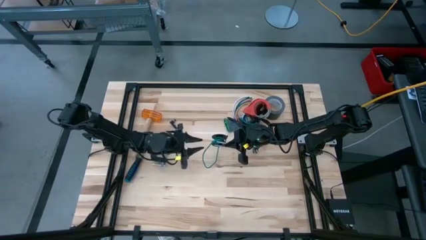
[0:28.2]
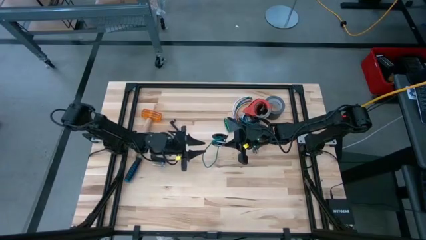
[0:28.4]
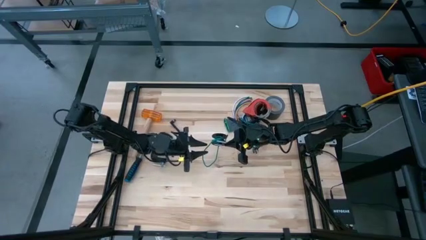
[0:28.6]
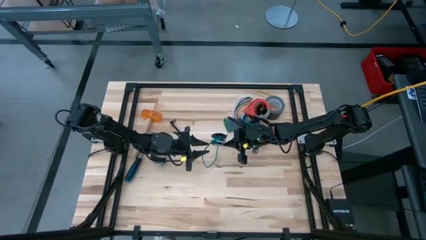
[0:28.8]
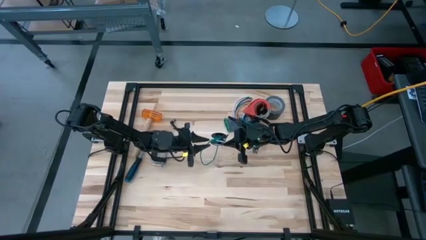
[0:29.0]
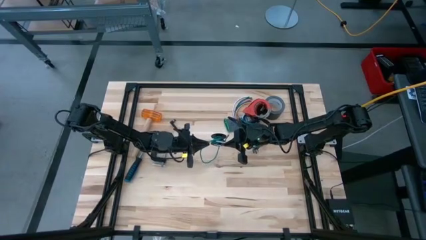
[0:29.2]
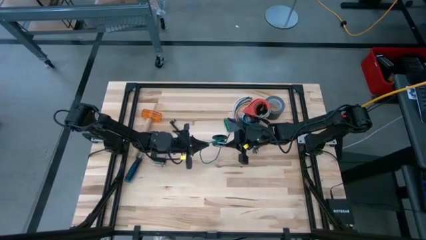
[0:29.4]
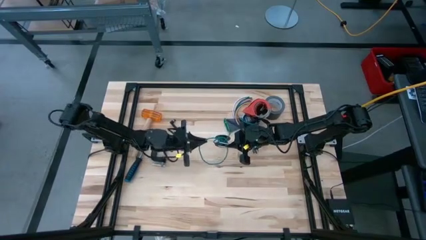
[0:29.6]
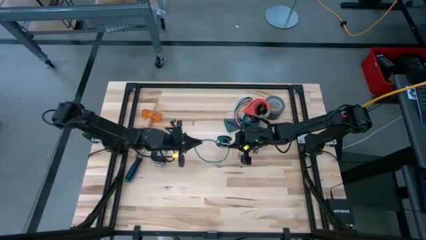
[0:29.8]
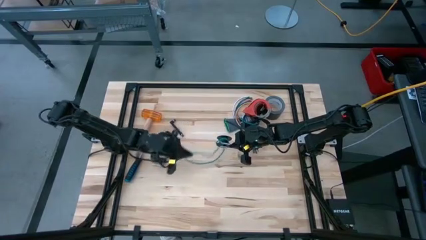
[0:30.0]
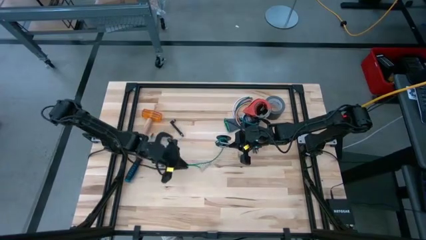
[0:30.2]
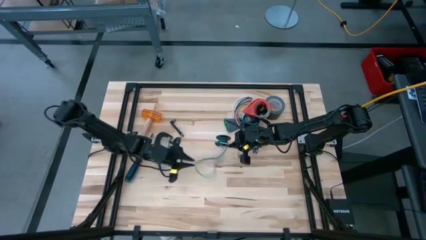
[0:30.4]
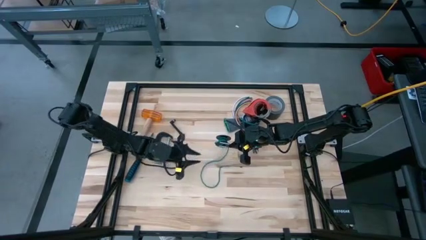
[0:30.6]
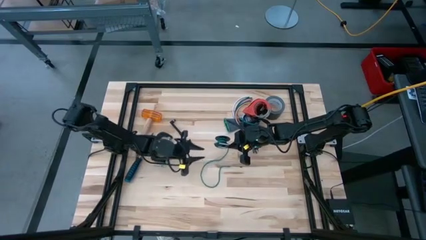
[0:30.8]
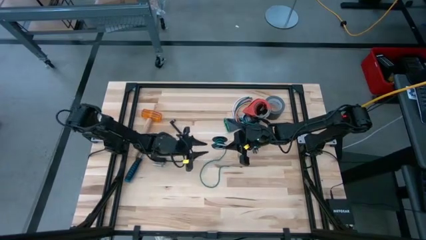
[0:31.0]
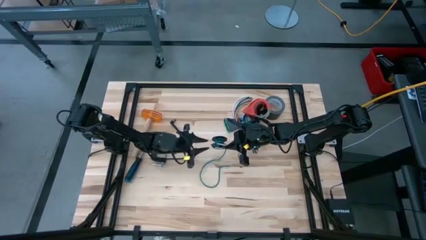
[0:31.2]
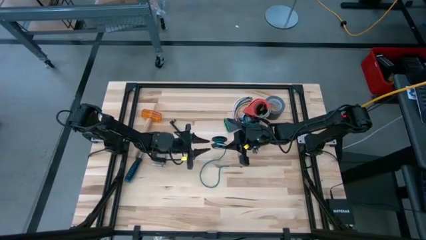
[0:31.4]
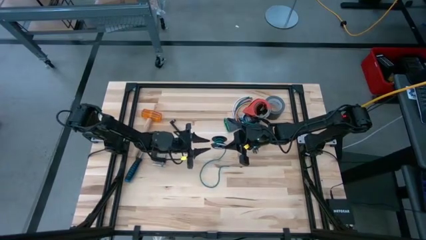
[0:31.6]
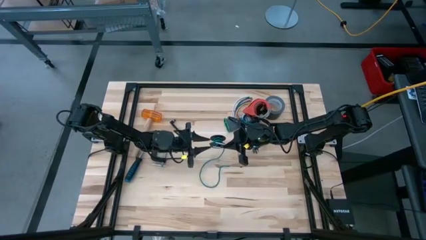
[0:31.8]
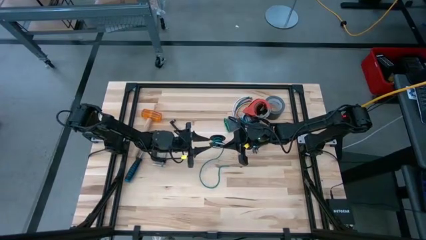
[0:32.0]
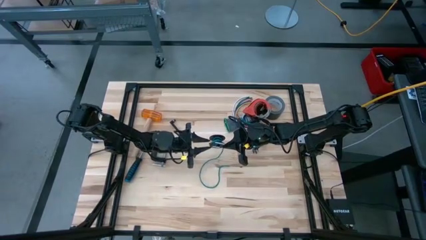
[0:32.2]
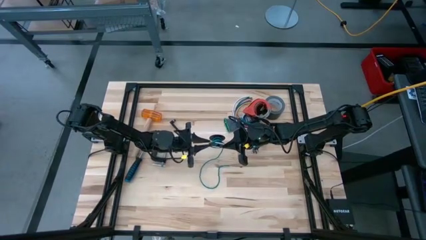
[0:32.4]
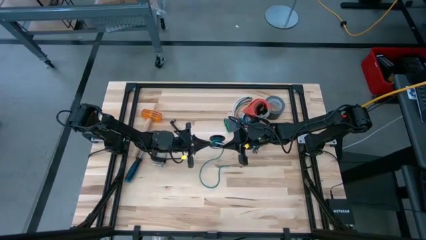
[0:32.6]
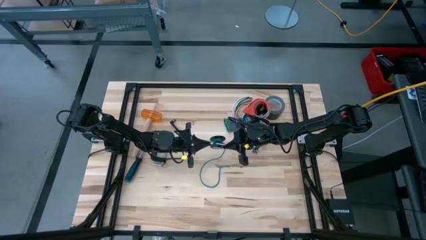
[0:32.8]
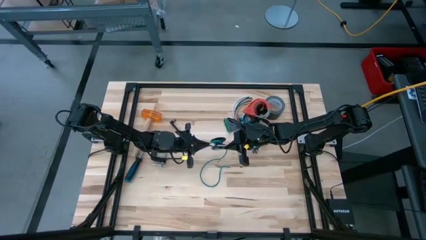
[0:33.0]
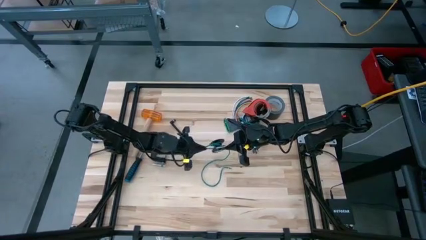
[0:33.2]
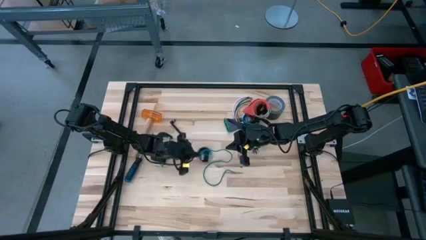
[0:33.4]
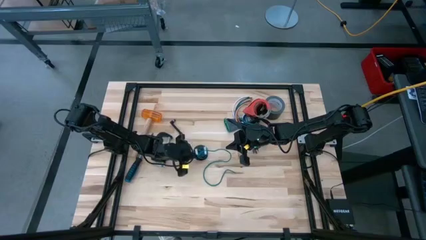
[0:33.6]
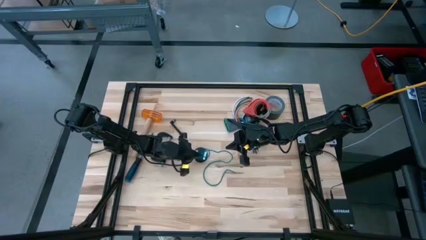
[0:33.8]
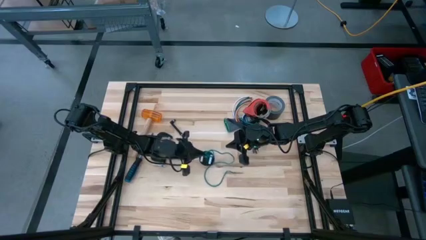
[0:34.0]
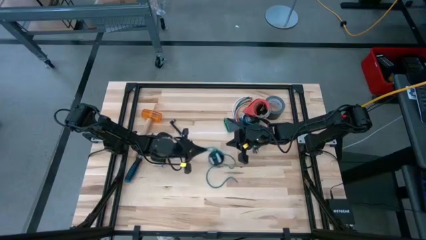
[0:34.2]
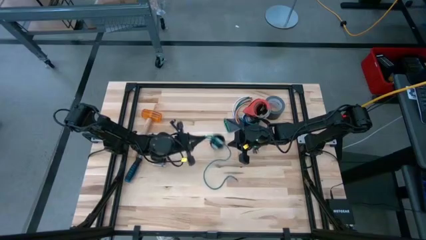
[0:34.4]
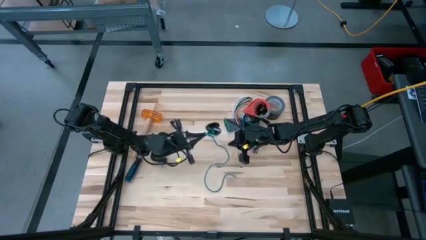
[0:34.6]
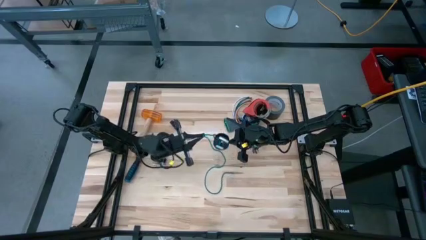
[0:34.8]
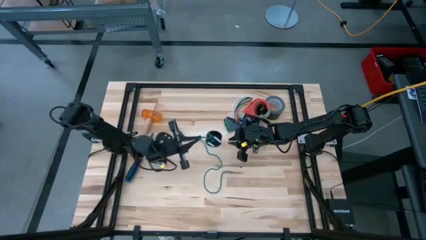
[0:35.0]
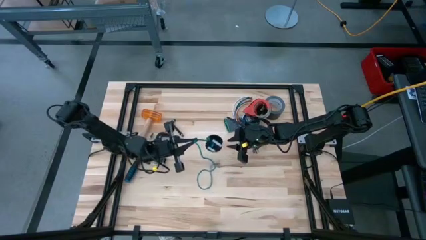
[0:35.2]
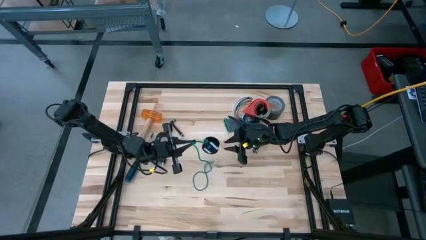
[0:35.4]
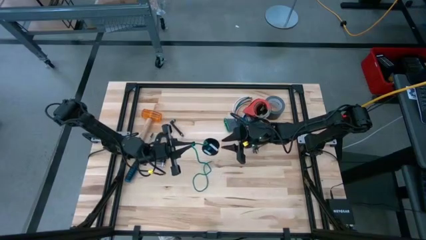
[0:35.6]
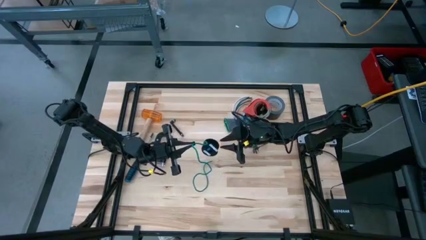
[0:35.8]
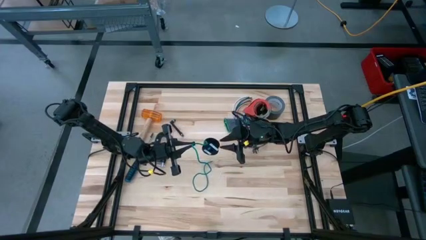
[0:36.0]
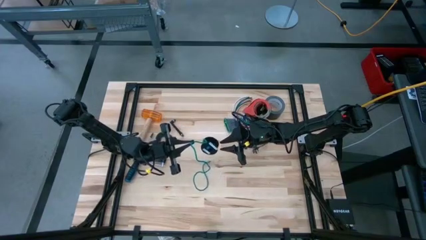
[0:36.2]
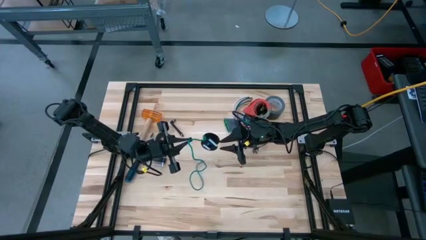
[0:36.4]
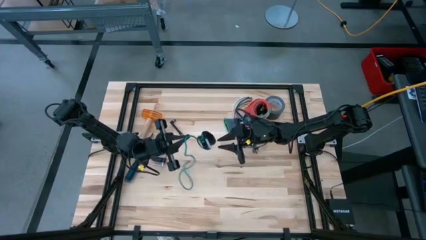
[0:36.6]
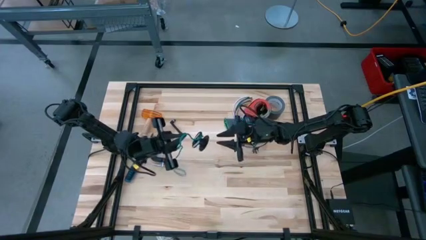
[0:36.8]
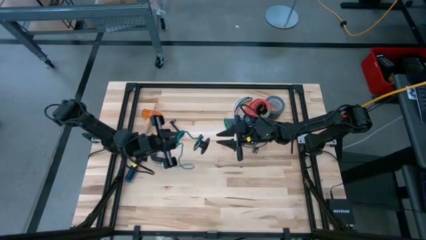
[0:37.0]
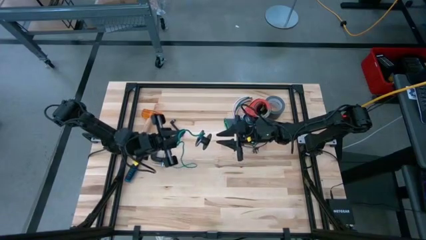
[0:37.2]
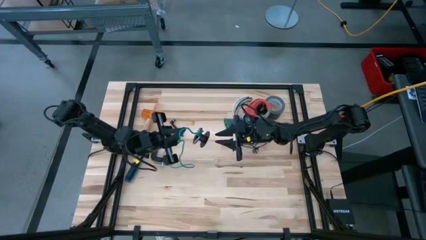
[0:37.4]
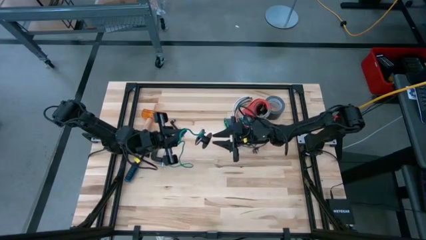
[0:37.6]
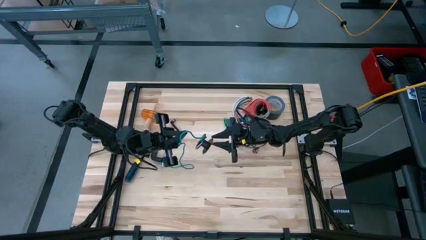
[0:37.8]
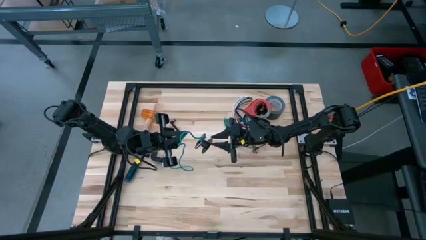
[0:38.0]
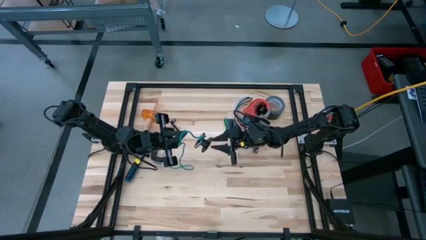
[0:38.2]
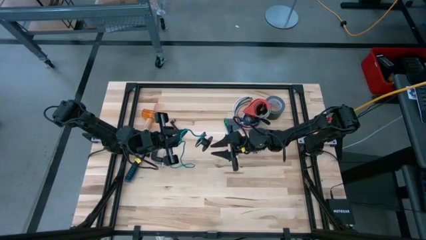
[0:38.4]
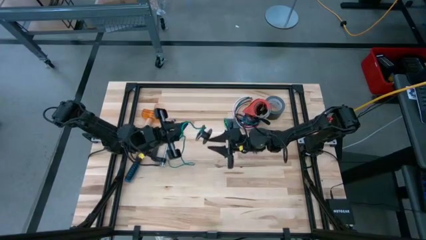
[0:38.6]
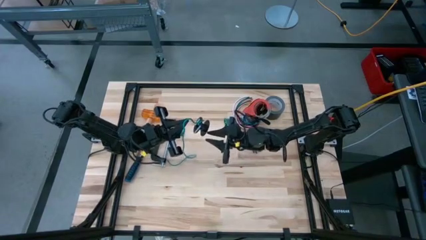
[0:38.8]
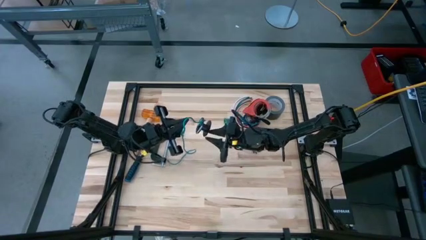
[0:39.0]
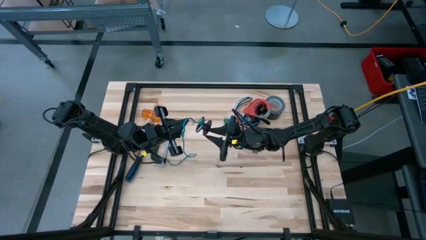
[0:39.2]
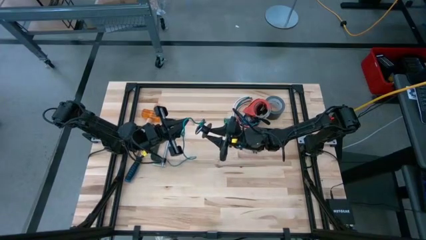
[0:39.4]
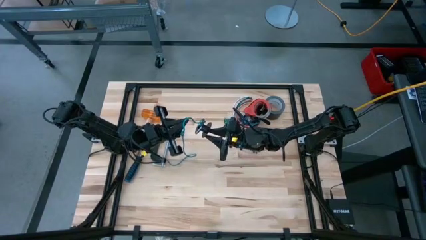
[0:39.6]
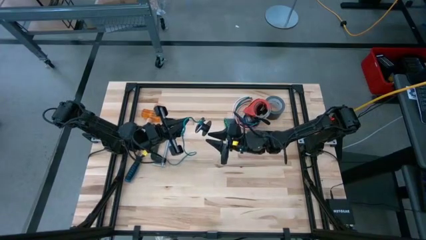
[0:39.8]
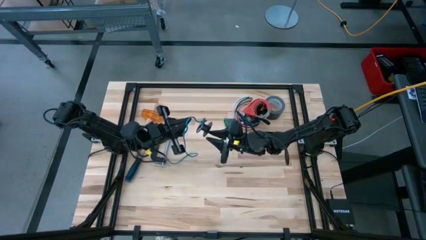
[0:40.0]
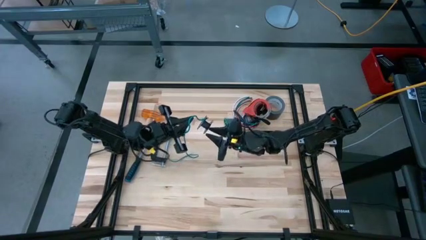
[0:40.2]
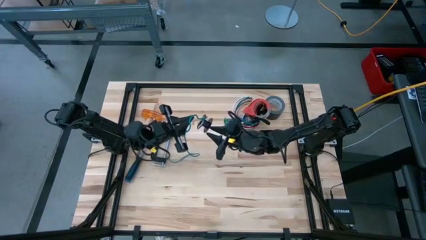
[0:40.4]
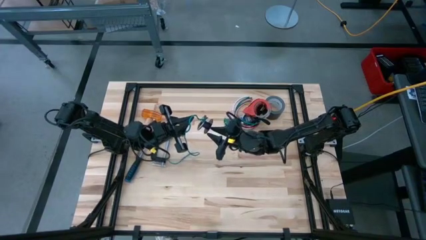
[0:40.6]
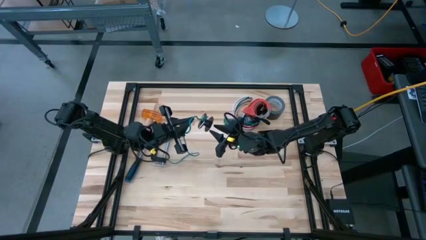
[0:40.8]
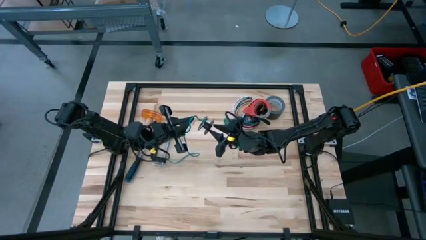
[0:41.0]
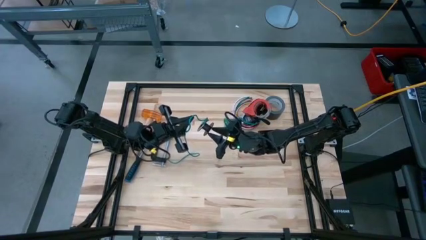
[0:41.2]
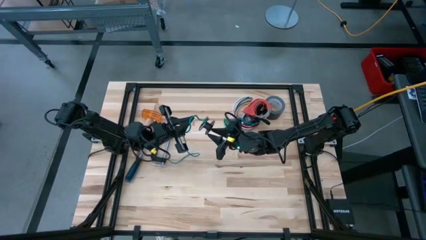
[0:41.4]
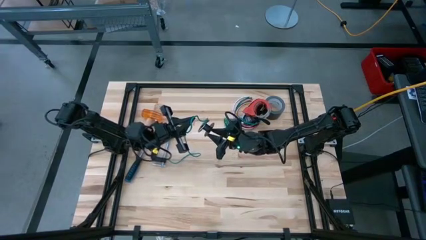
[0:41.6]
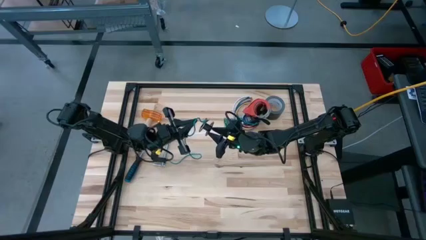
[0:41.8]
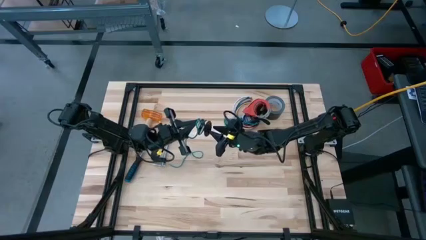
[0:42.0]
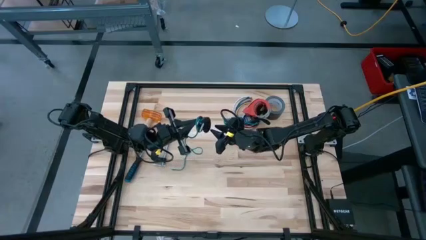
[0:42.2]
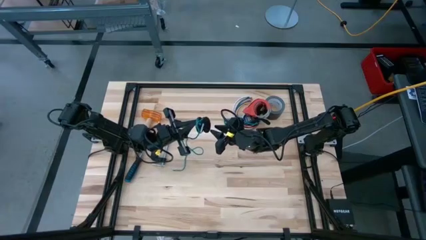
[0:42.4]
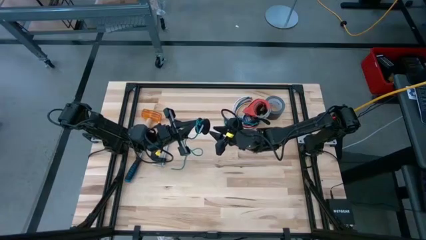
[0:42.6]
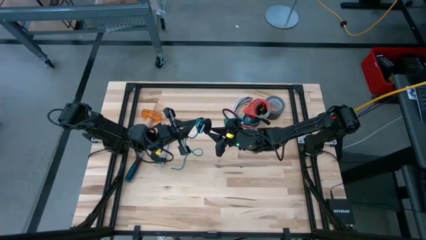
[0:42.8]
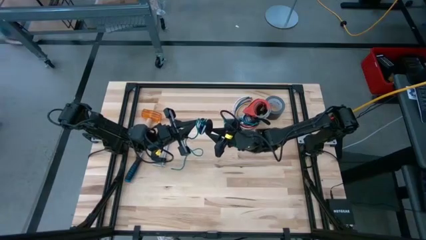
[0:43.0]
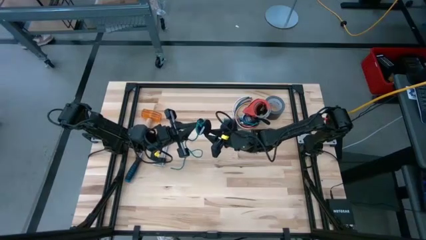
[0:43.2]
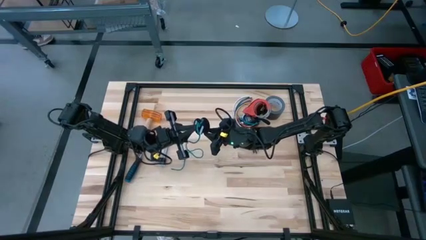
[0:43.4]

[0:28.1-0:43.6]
Task: Coil cords
Uncoil the green wire from the spool

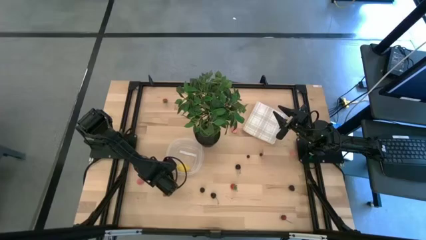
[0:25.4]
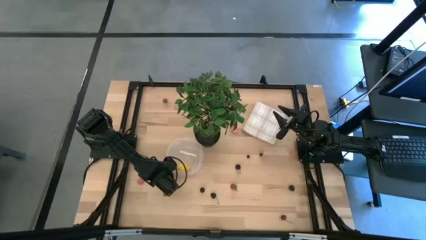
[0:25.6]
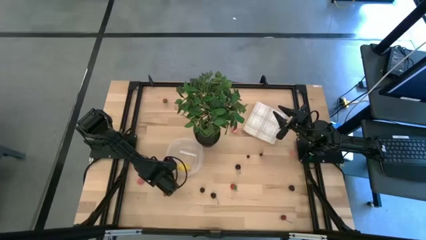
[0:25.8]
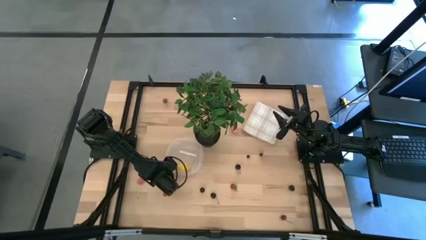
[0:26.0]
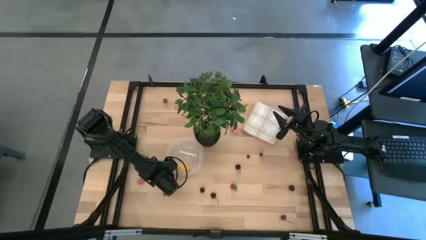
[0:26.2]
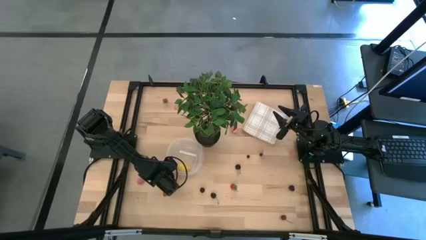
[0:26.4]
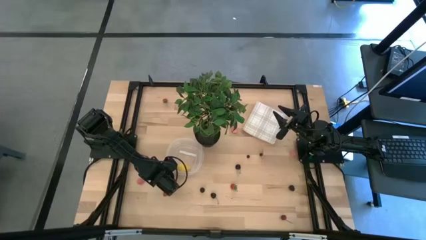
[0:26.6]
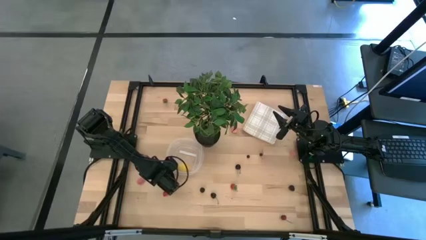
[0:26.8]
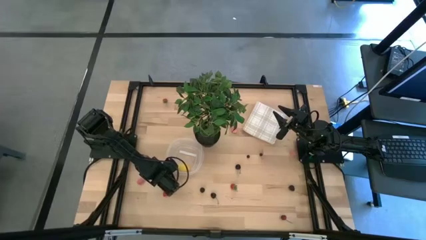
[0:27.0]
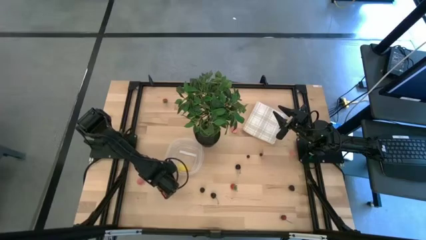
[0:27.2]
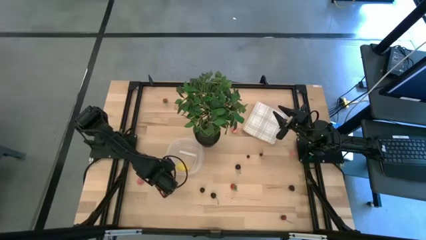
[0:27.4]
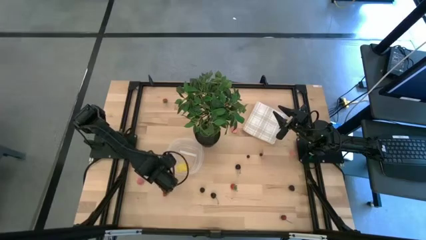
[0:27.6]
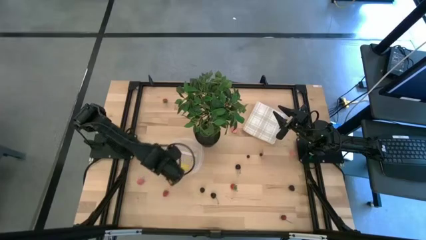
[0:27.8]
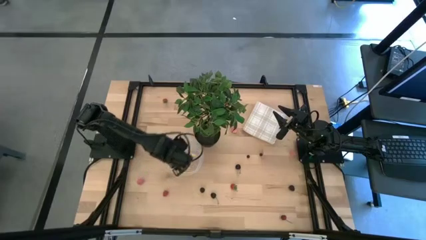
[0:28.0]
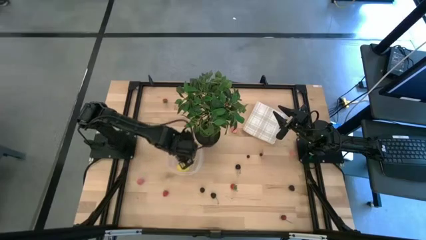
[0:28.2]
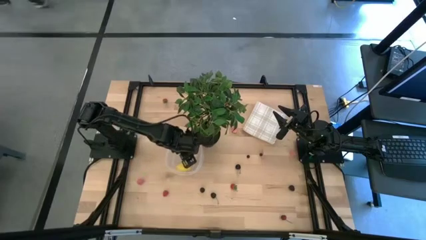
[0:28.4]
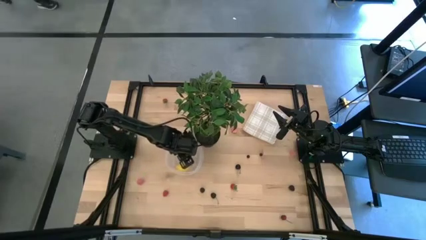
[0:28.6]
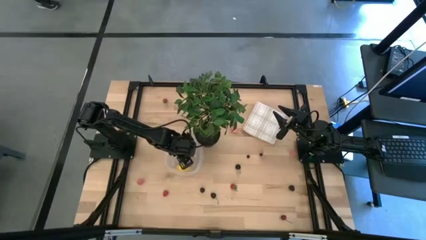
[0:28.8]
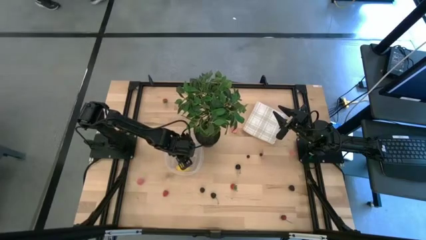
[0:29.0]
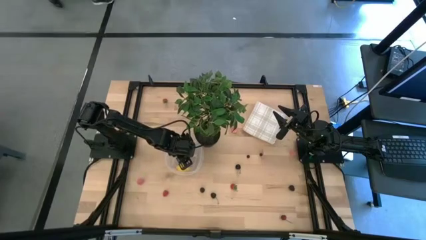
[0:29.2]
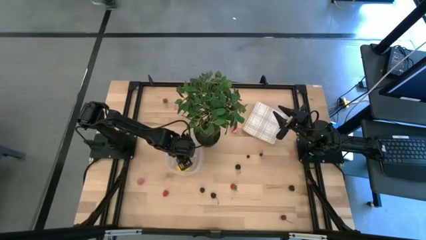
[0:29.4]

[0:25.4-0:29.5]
Task: Pick and placing Produce into tupperware
Put the middle left red strawberry into the transparent bin
